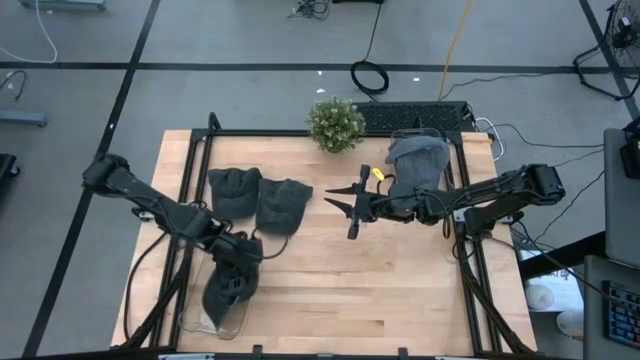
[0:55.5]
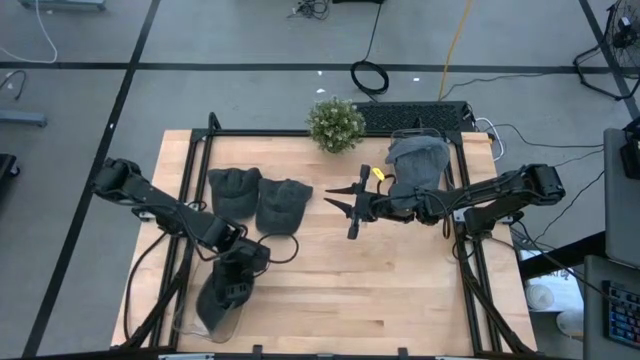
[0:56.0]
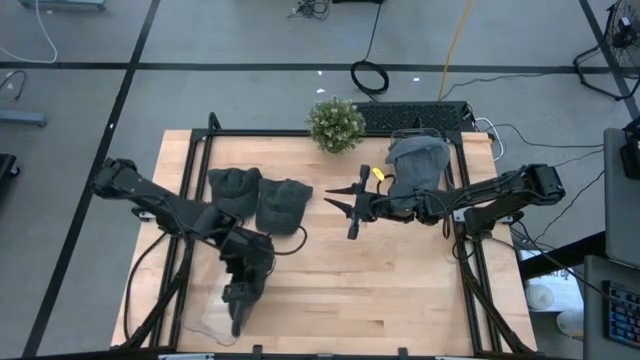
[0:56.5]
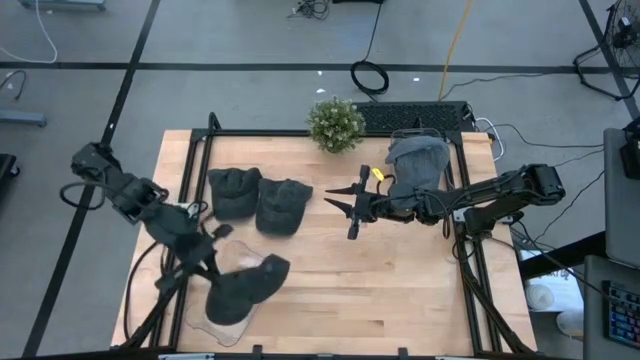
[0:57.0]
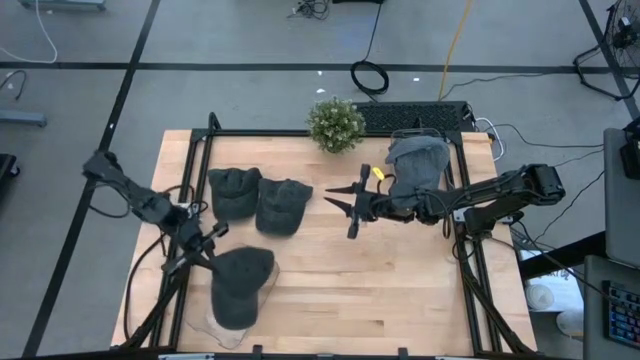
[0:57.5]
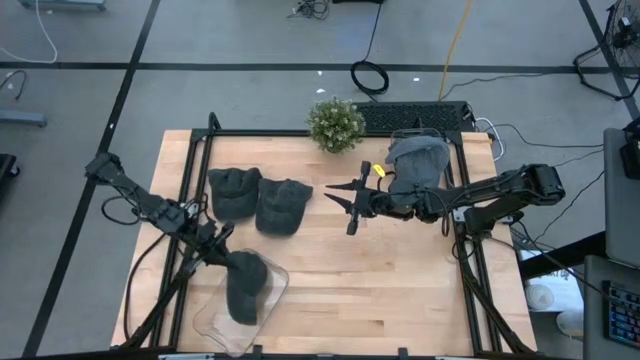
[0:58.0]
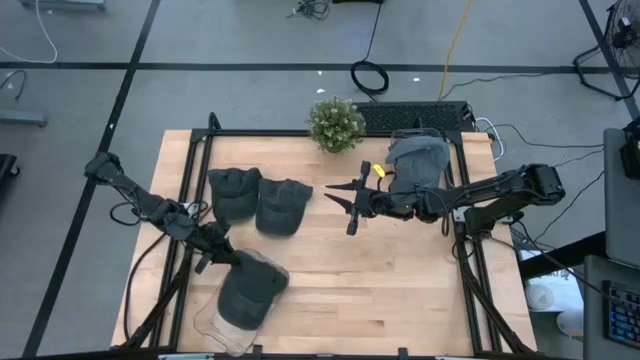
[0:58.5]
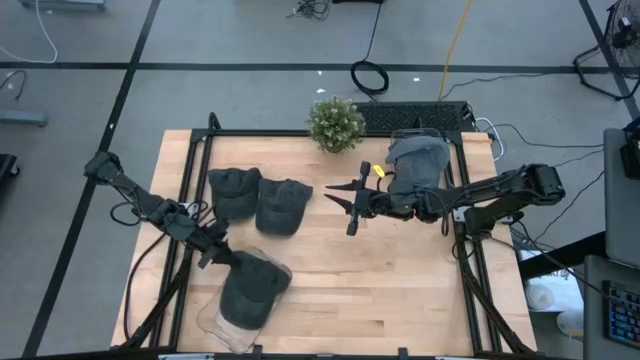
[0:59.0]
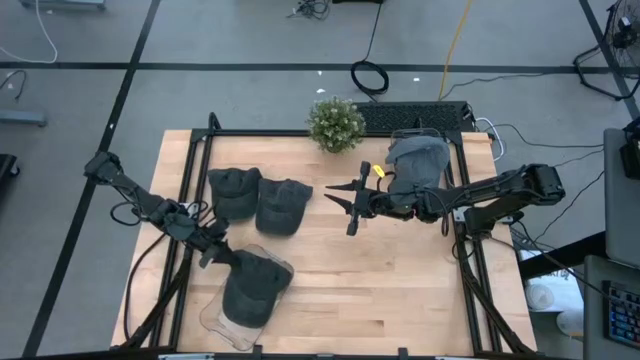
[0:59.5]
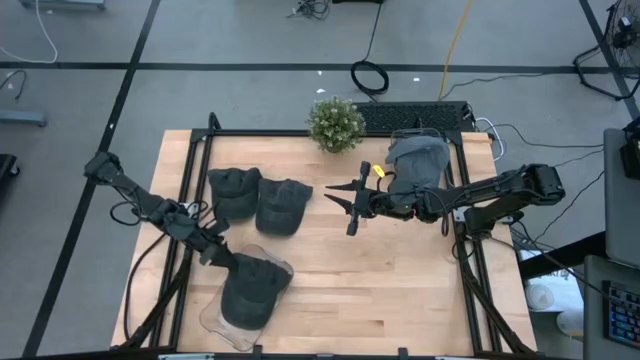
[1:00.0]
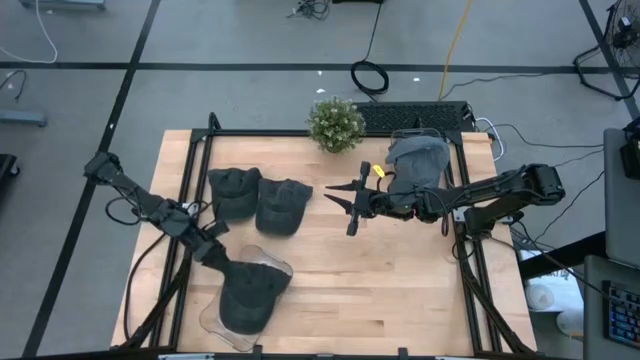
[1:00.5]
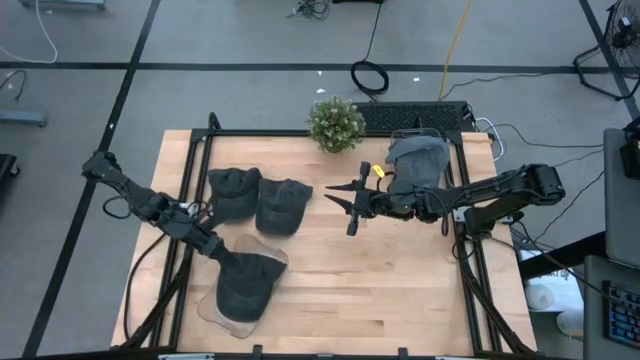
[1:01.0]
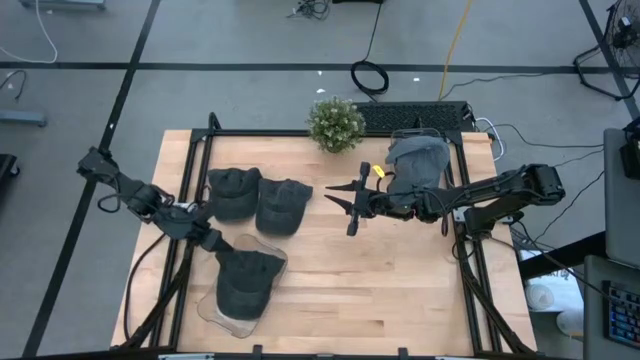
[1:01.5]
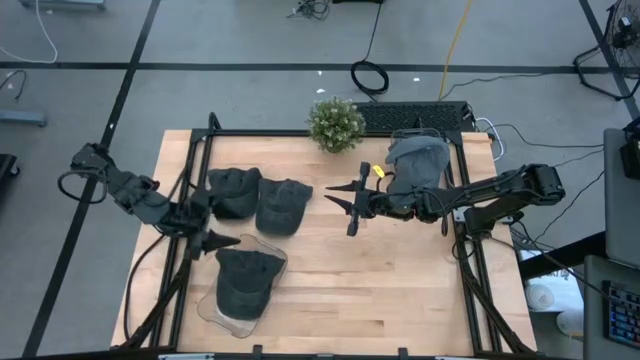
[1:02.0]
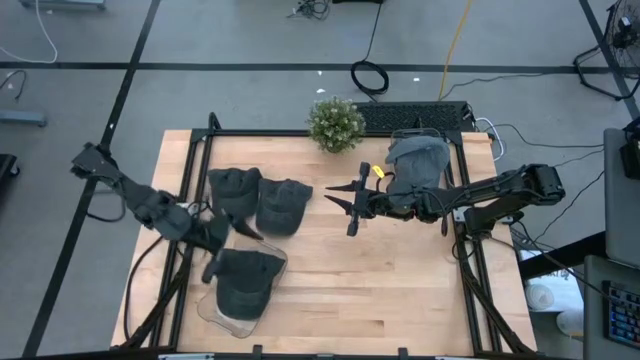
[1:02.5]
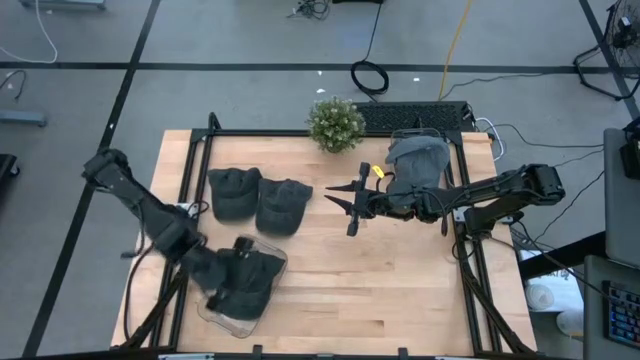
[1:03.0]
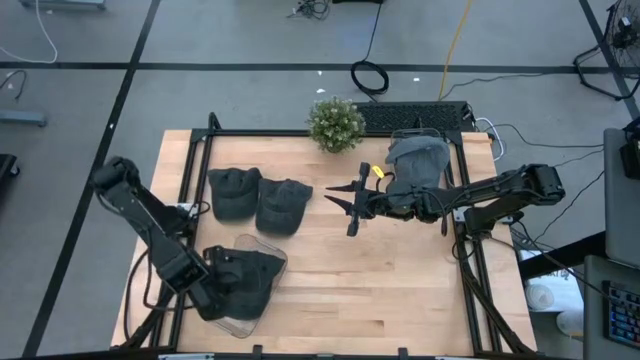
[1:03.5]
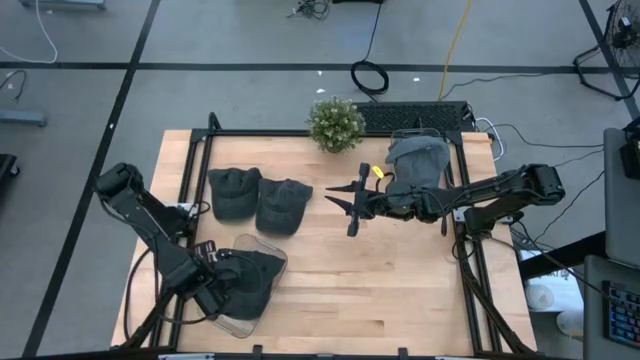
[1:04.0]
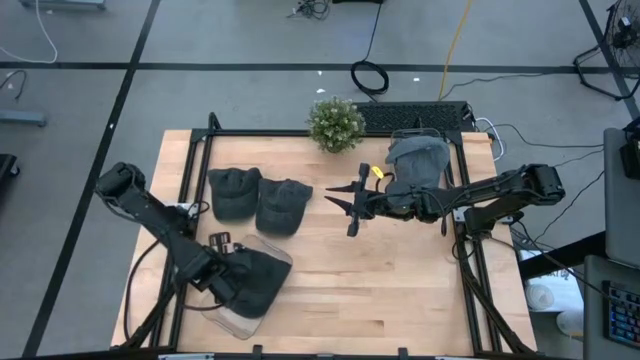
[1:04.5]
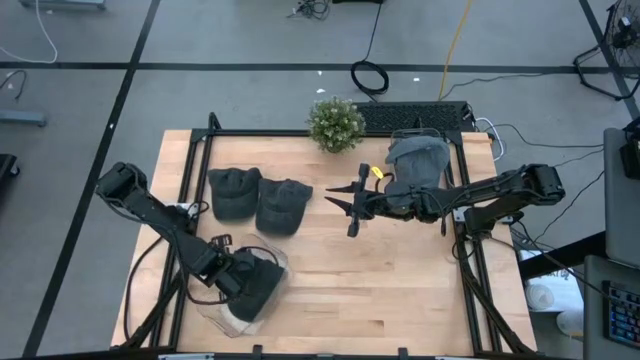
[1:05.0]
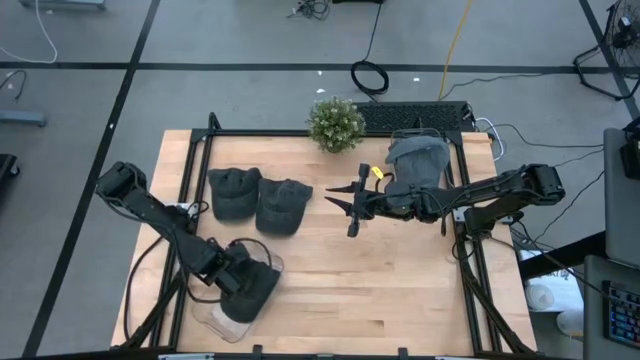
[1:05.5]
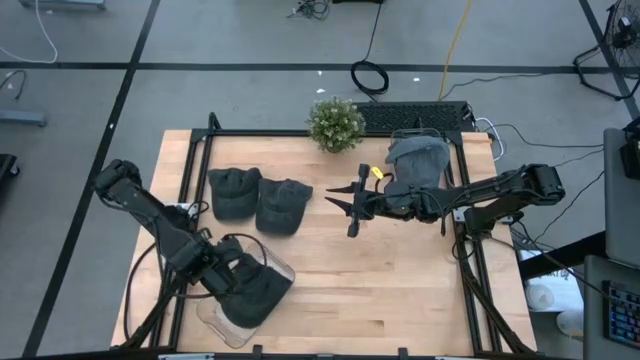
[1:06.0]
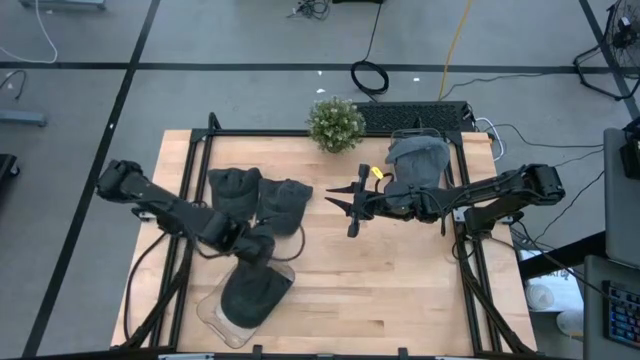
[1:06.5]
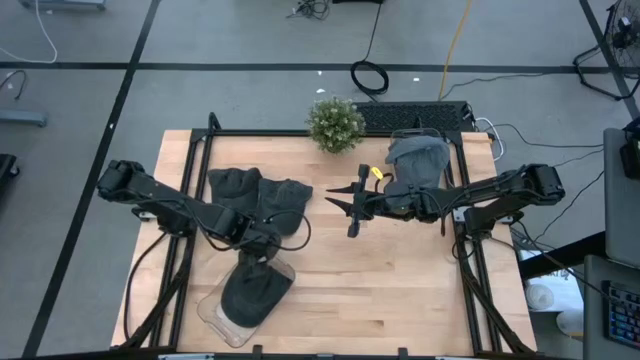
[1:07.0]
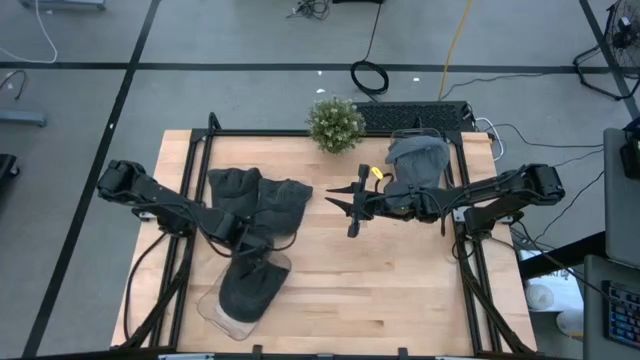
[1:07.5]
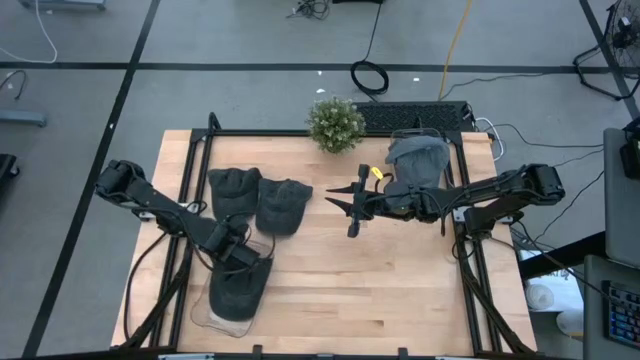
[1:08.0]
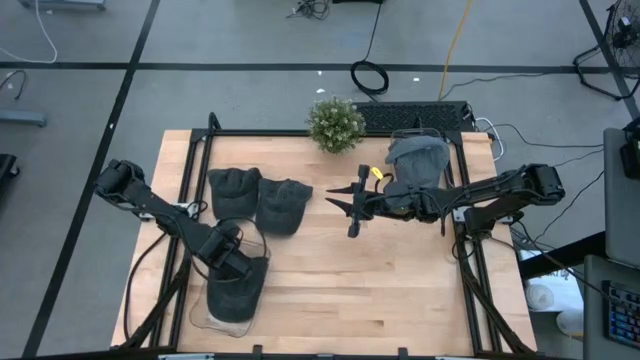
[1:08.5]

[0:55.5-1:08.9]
Task: Pick & Place hat
Put the right black cap into the bottom transparent bin

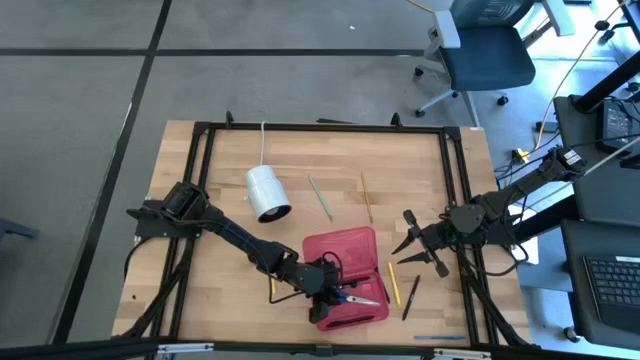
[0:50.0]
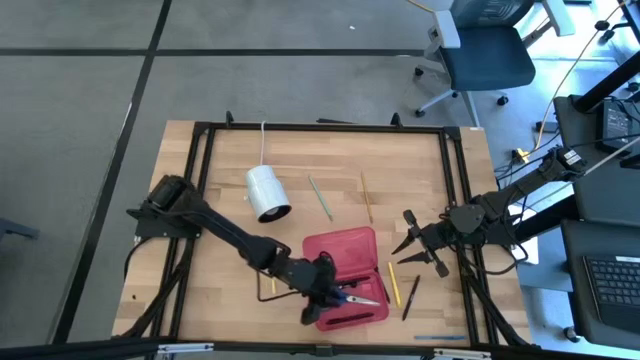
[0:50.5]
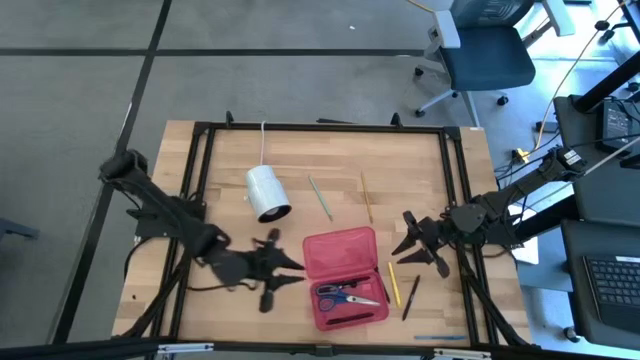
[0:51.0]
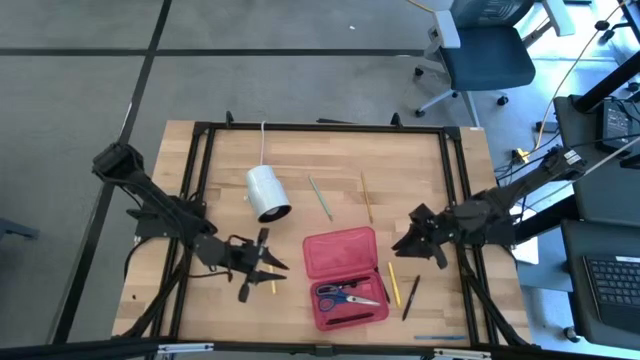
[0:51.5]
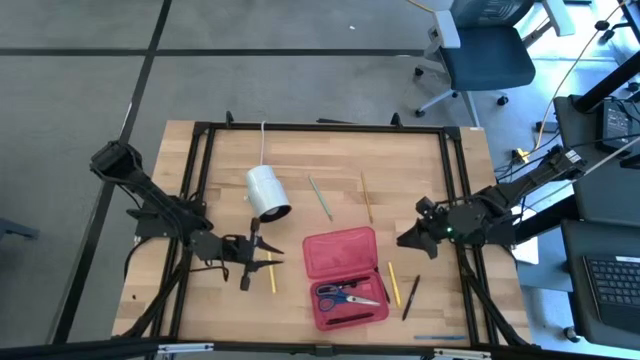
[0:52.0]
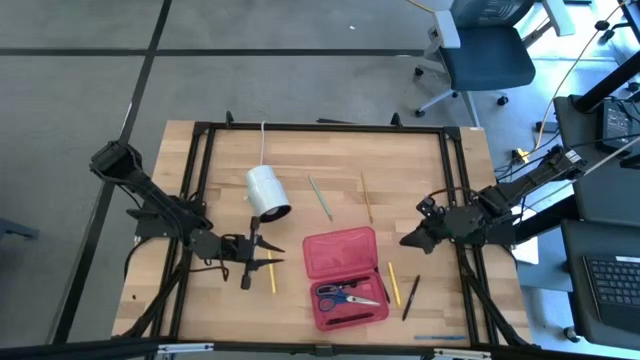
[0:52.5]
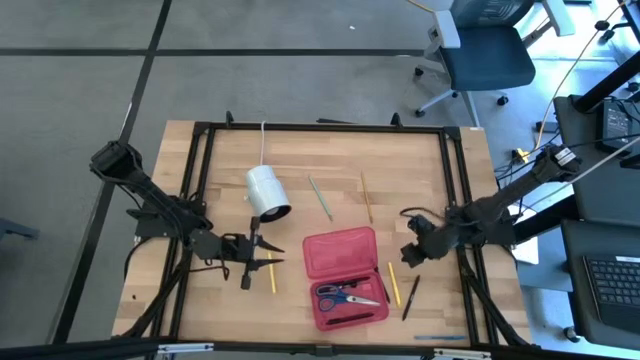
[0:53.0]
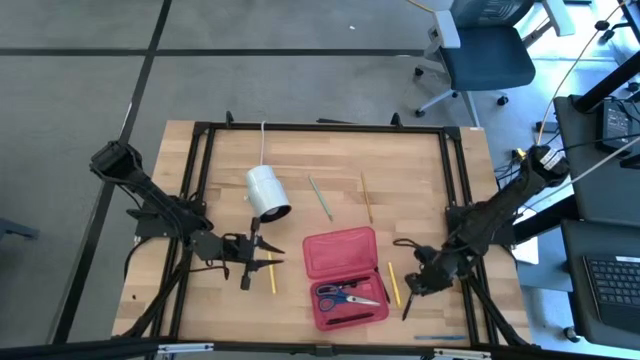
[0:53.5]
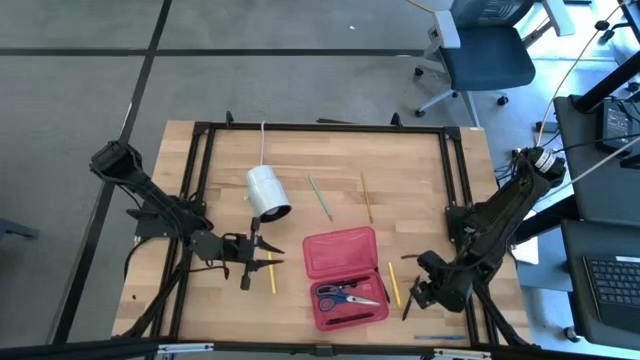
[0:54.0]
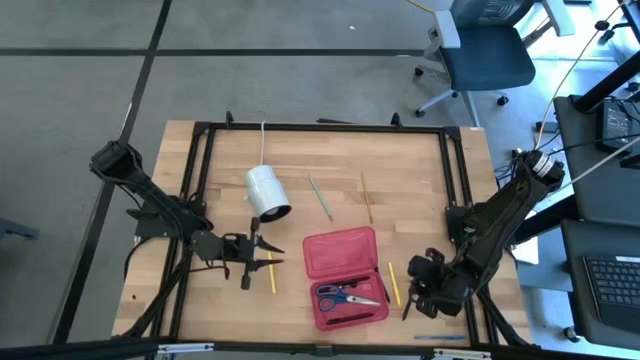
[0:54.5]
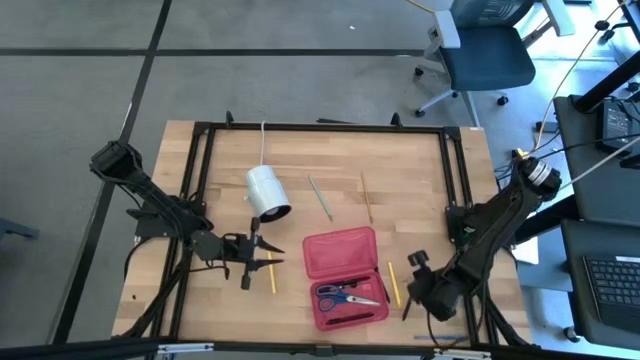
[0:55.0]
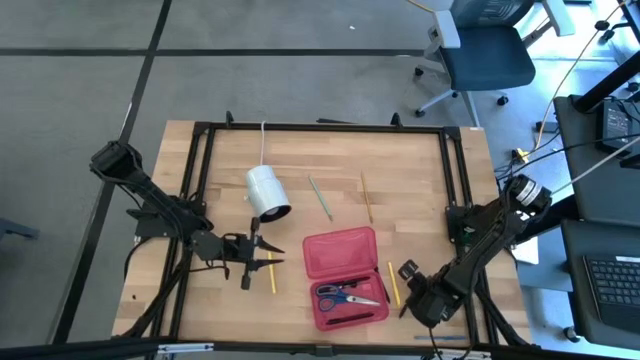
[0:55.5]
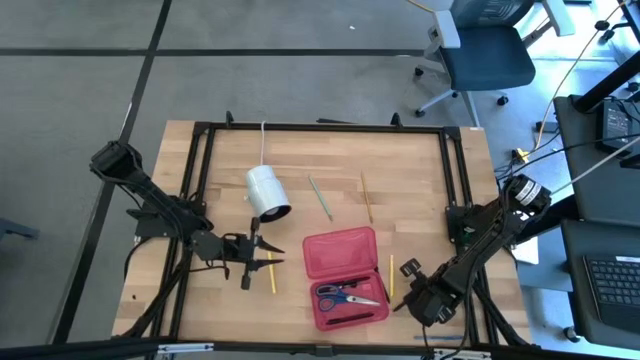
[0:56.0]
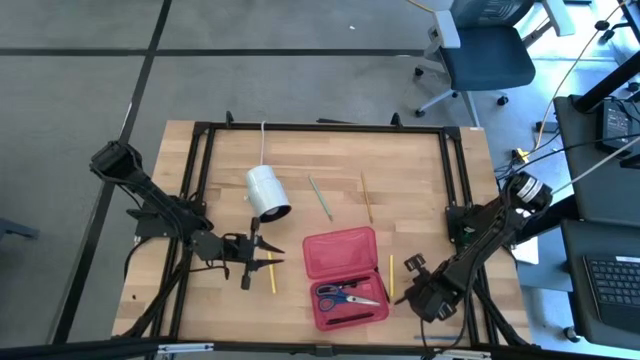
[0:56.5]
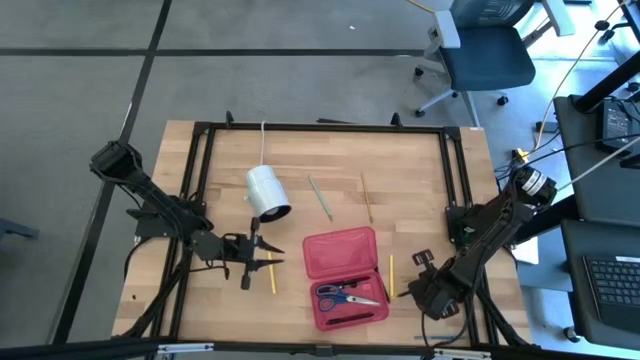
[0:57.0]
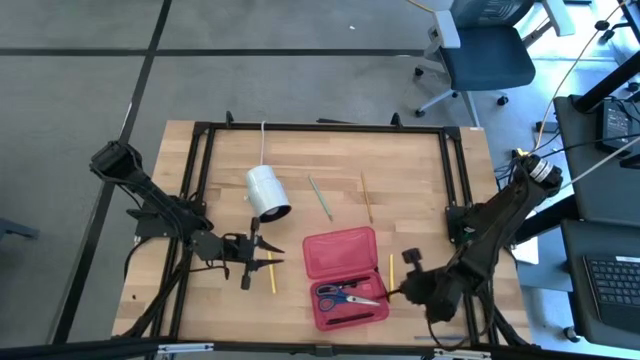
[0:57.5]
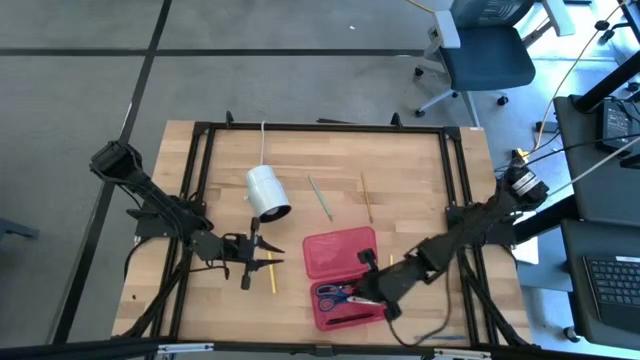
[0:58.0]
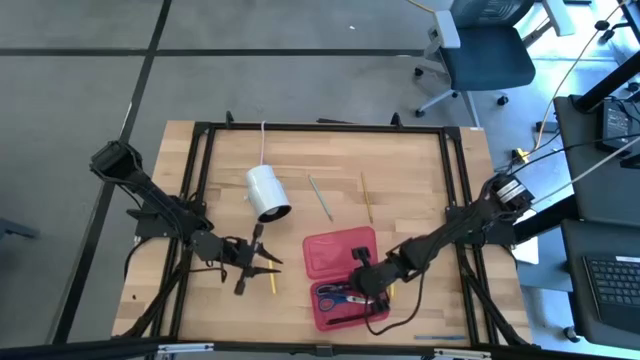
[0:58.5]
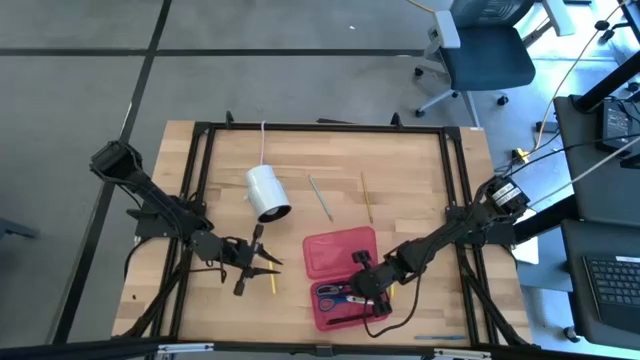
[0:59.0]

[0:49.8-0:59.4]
Task: Pick & place school supplies into a supply box
Put the black pen into the pink supply box
